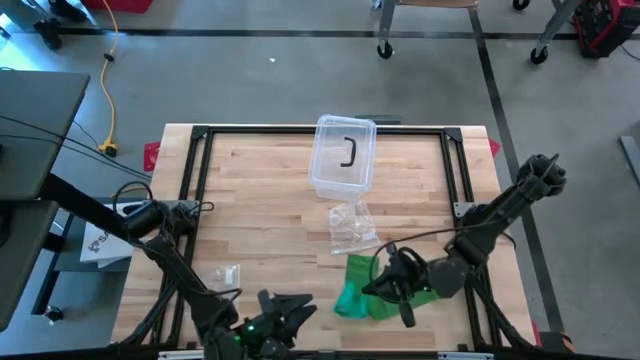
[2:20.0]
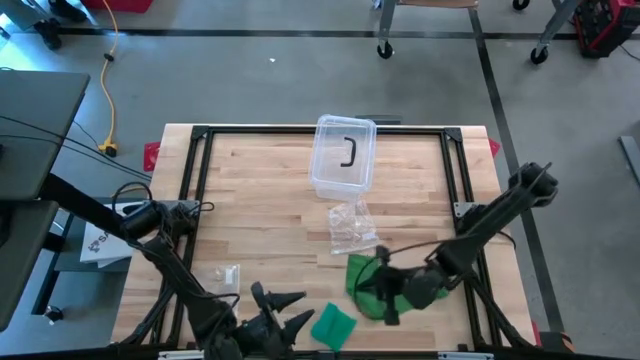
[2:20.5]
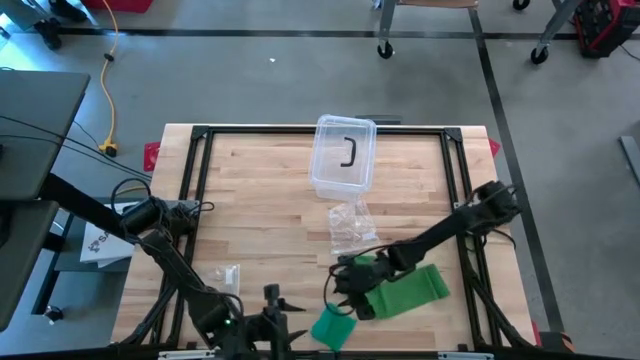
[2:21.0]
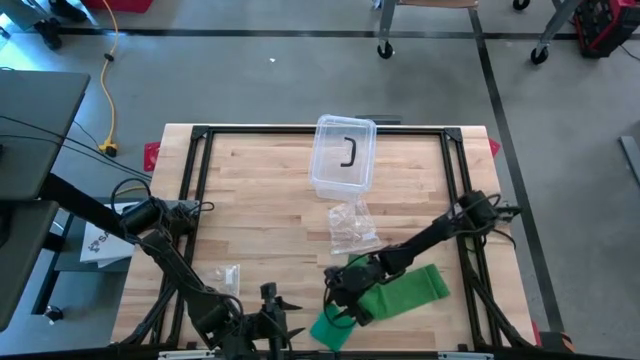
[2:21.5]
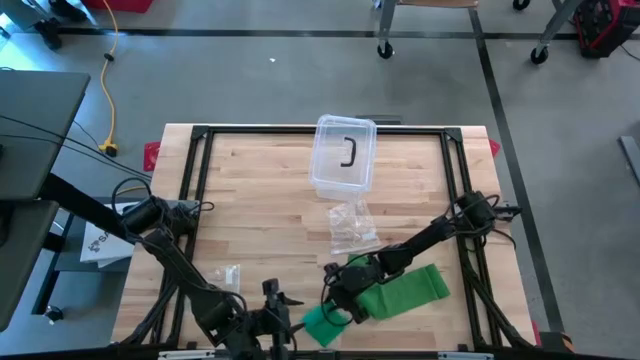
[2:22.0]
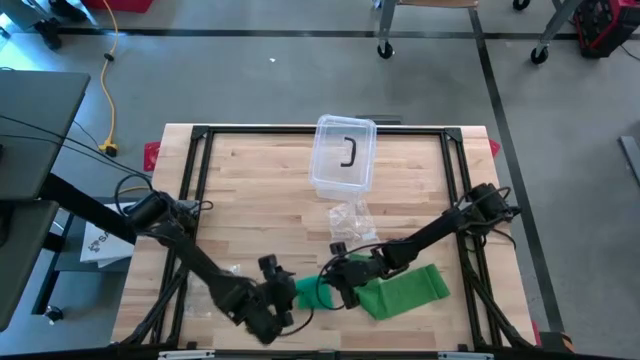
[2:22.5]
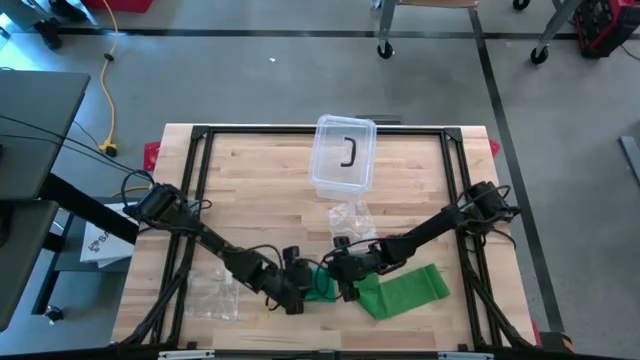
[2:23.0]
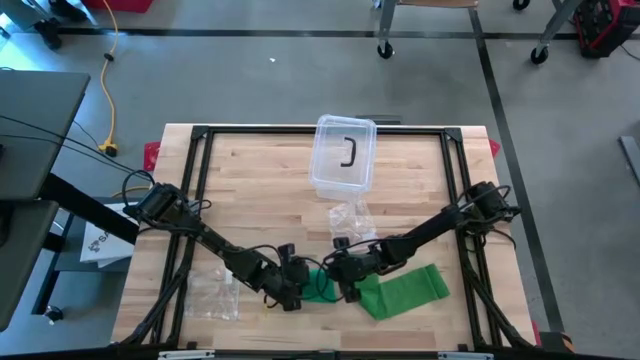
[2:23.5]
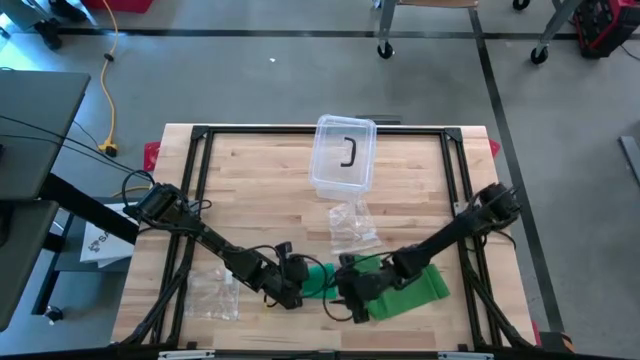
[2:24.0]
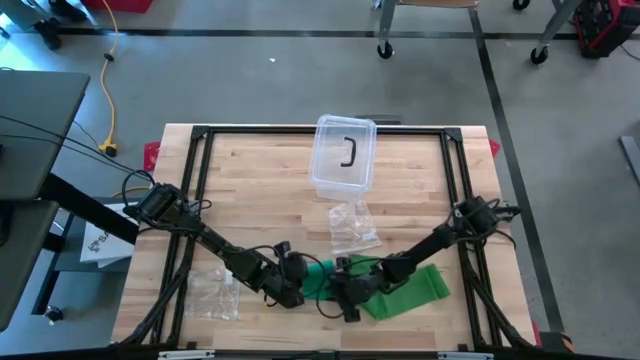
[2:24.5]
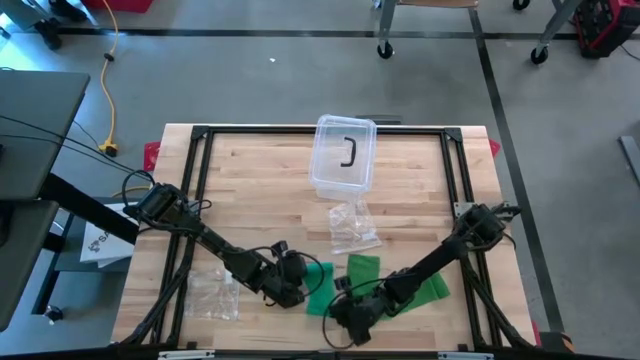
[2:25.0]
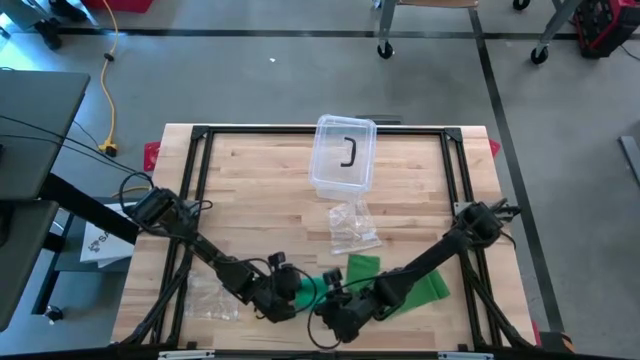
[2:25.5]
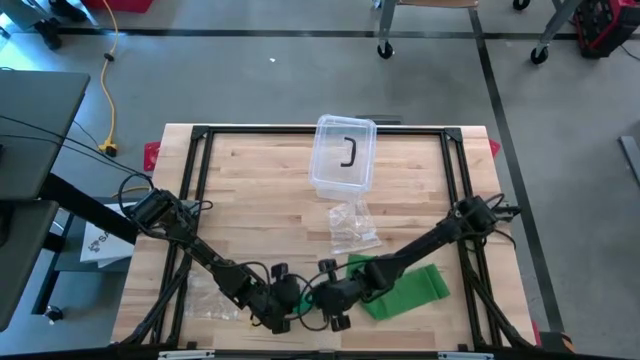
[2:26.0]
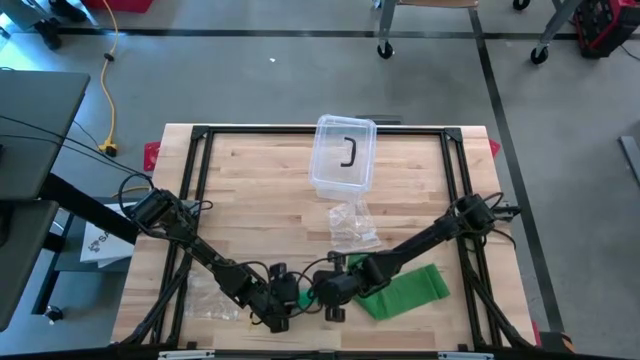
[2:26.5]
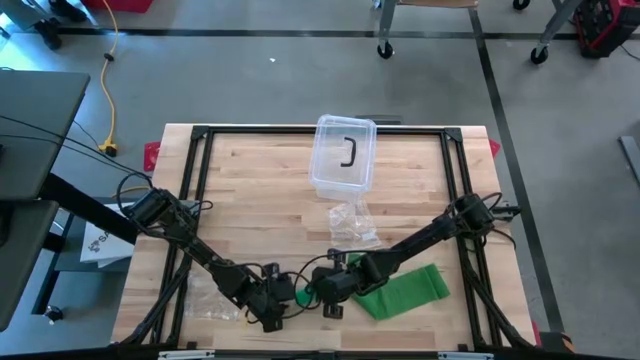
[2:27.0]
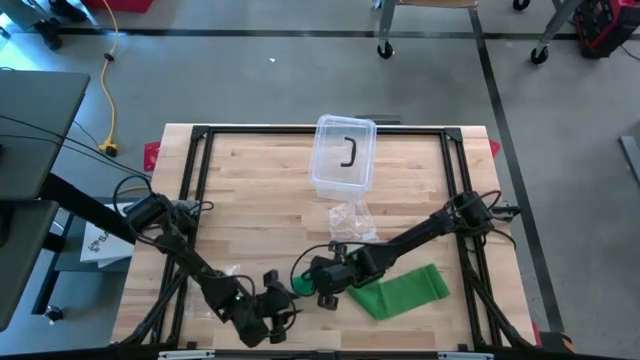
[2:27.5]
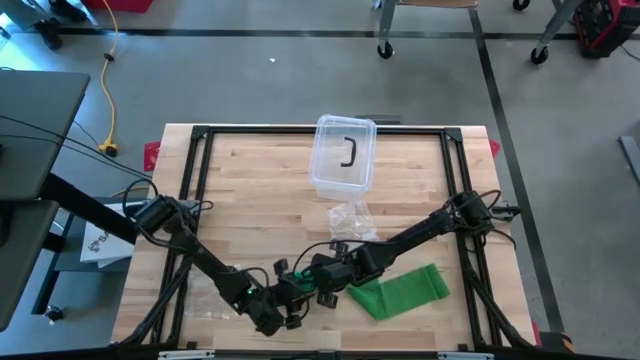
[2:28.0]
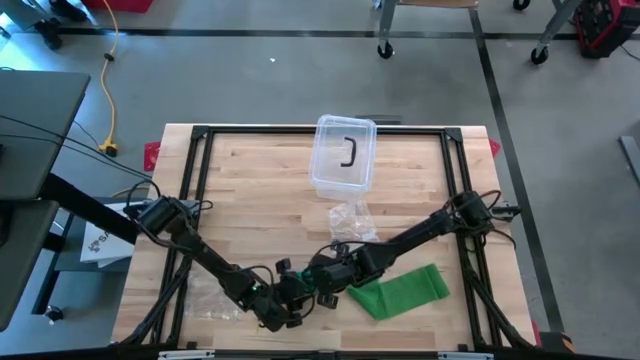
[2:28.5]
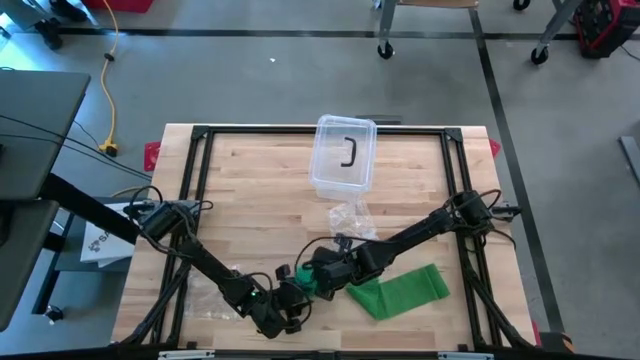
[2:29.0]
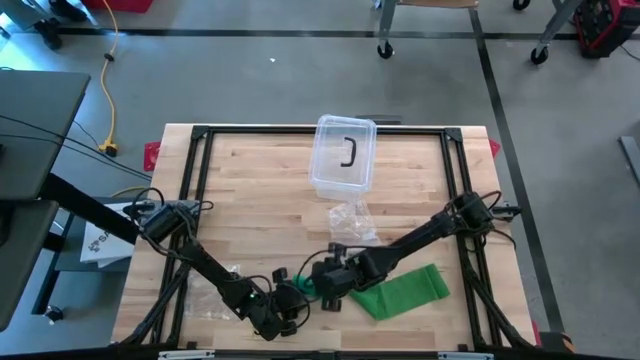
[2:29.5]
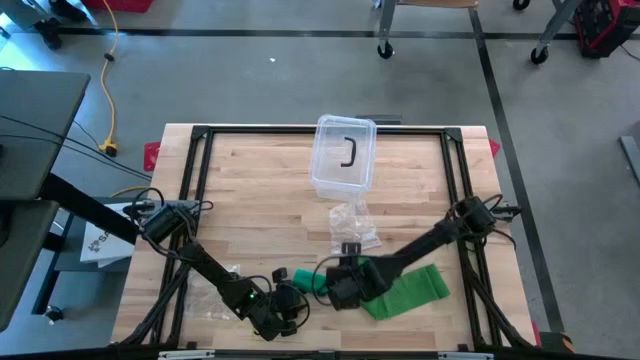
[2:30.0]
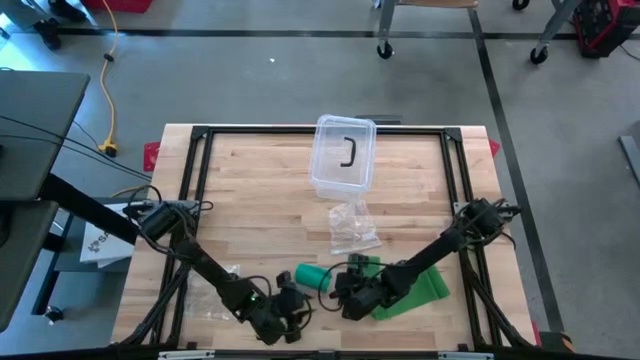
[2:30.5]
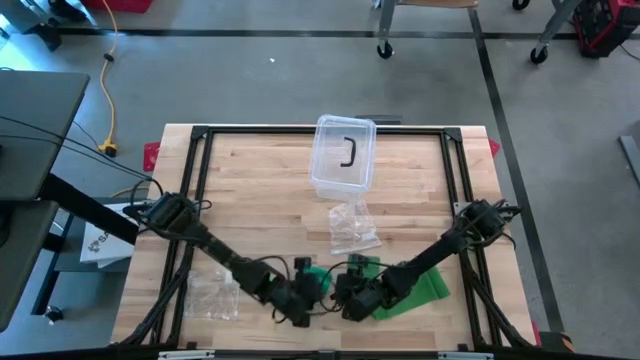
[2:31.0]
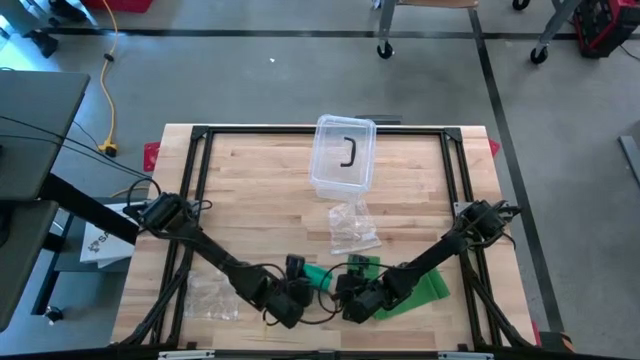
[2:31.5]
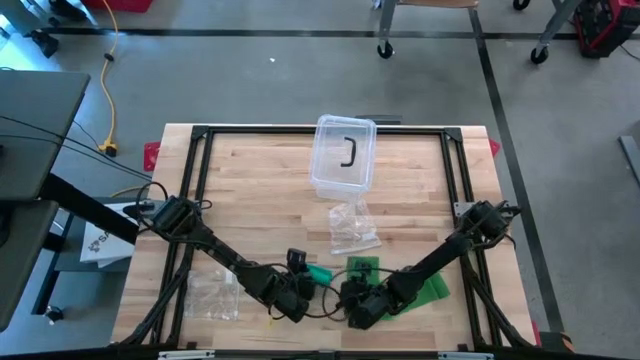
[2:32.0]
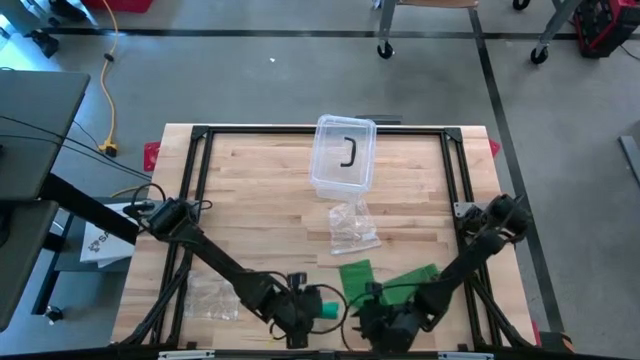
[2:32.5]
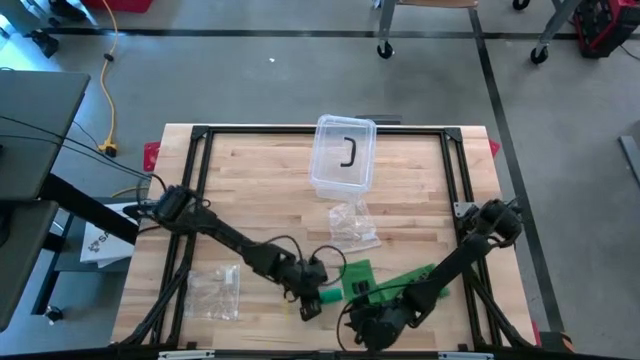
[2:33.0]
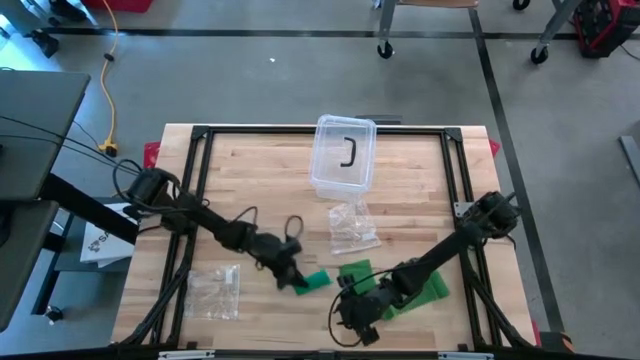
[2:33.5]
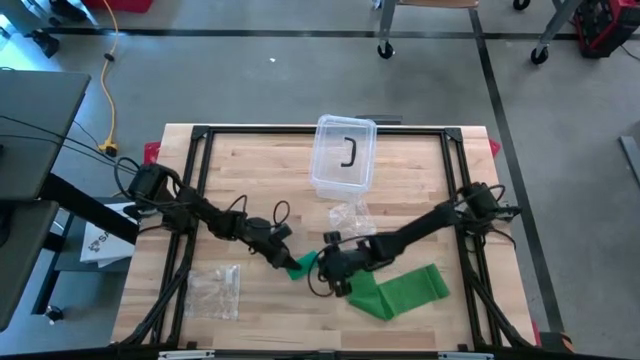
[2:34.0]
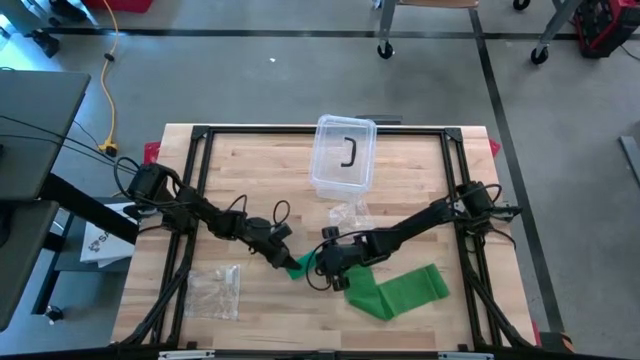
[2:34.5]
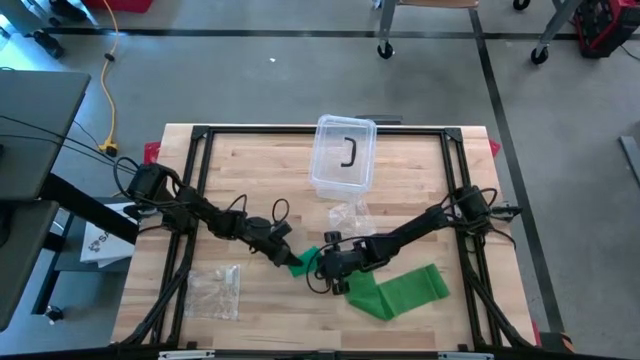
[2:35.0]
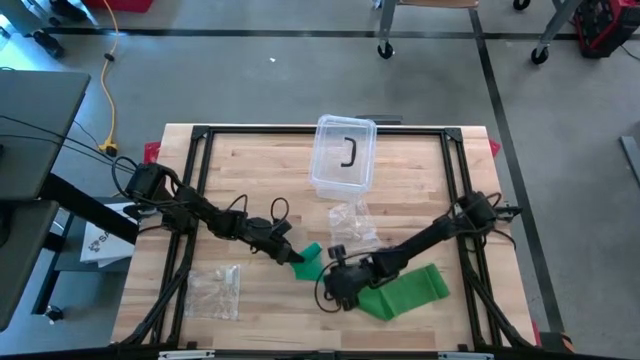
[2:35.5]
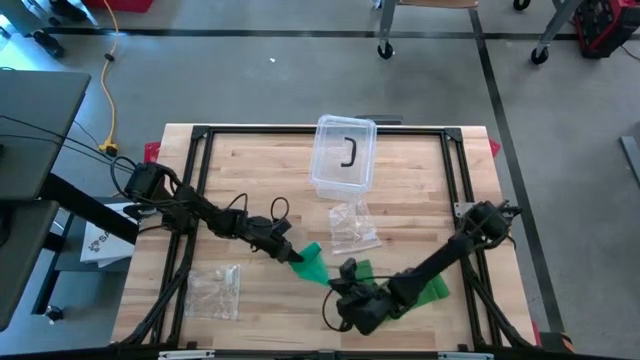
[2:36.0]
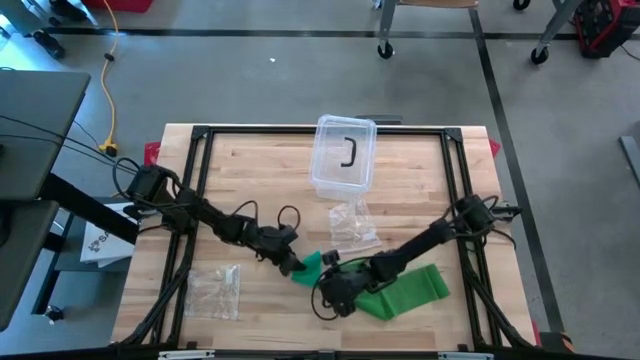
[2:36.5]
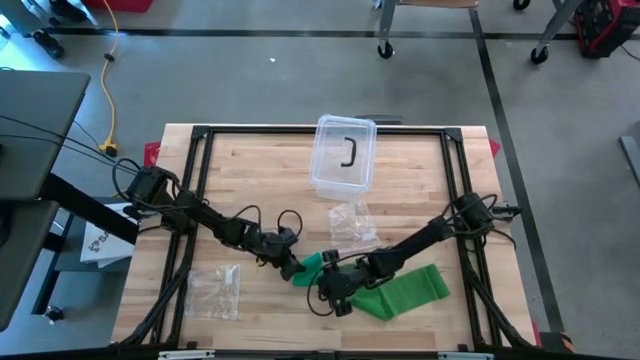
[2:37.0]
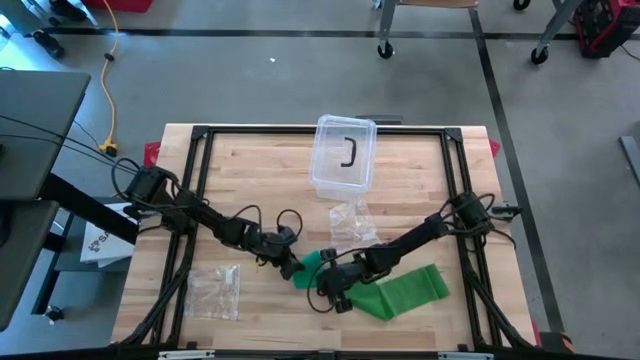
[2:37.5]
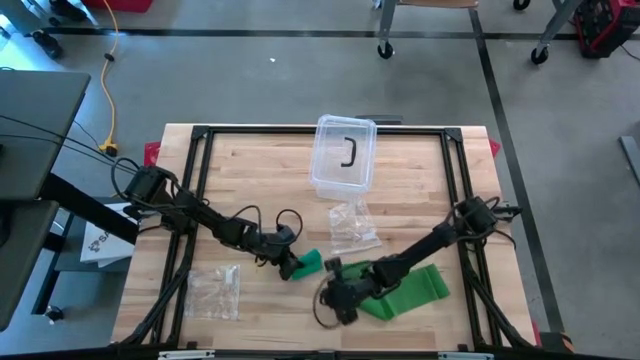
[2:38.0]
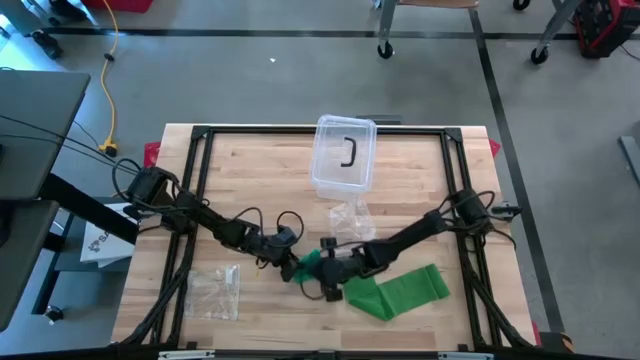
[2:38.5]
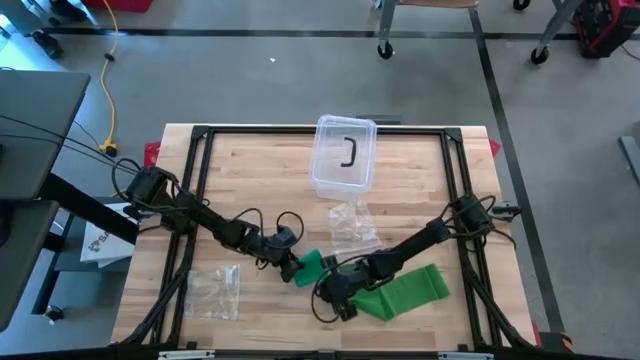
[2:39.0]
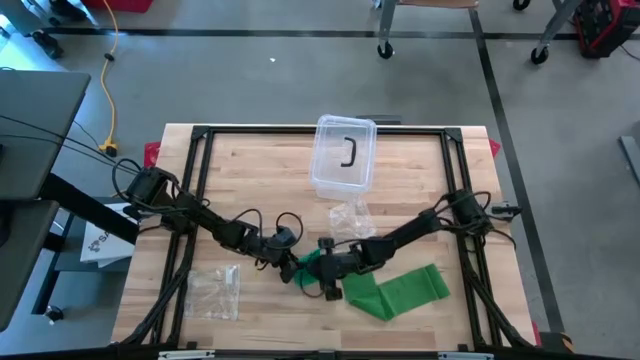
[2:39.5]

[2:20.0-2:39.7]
Task: Roll bandage
Roll the blue bandage
